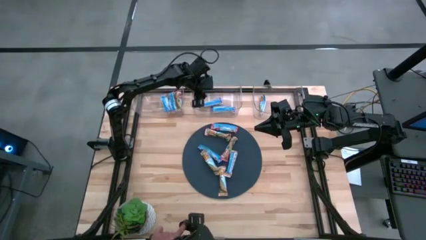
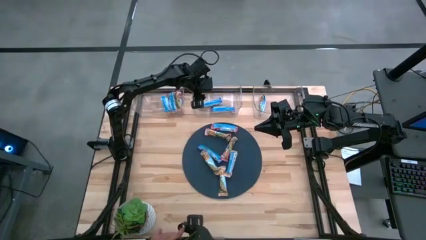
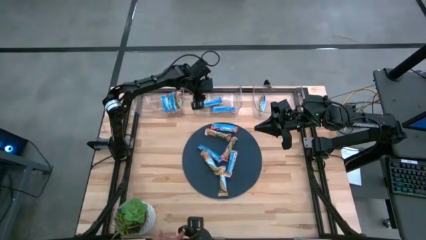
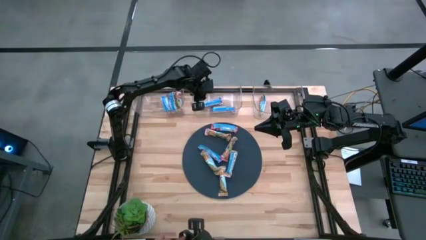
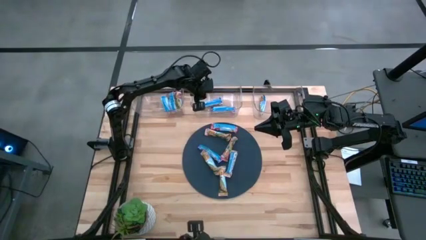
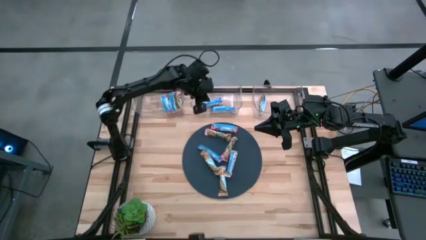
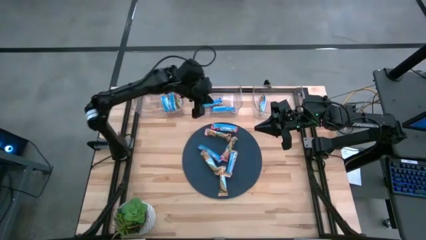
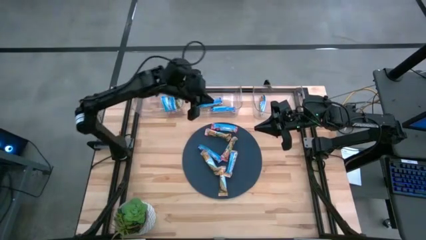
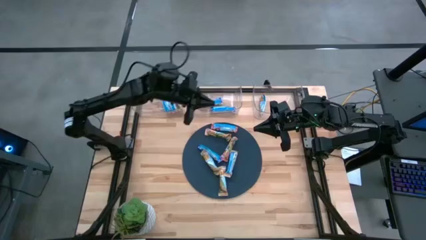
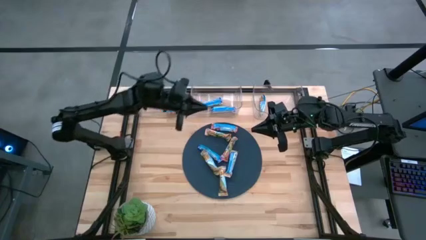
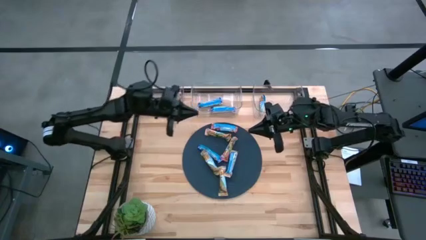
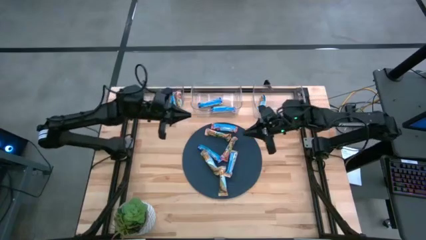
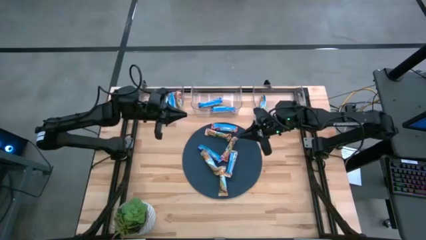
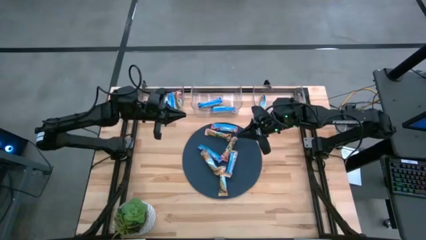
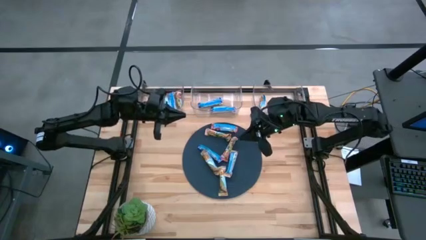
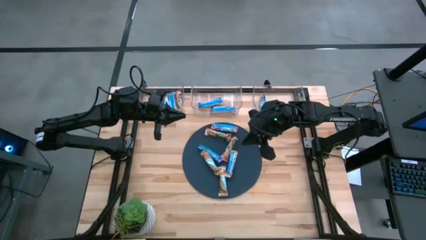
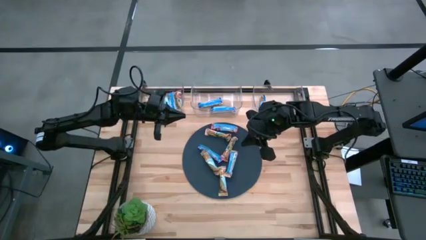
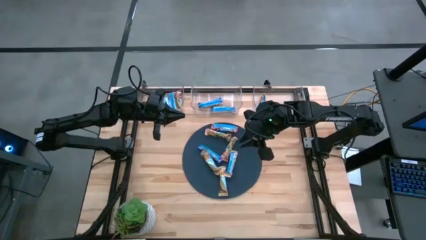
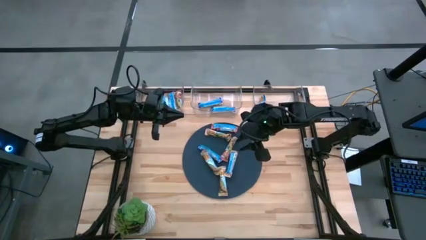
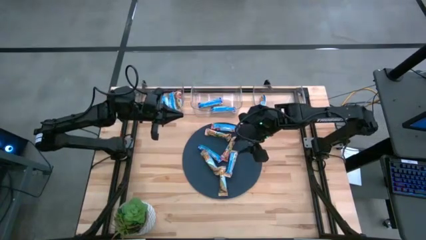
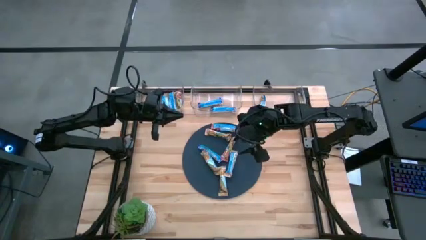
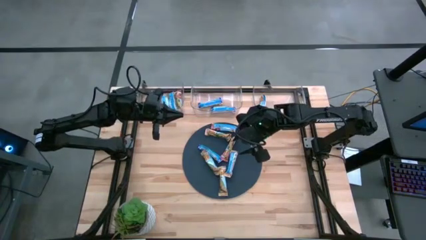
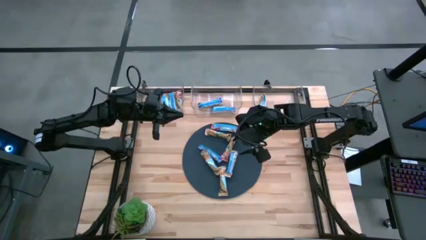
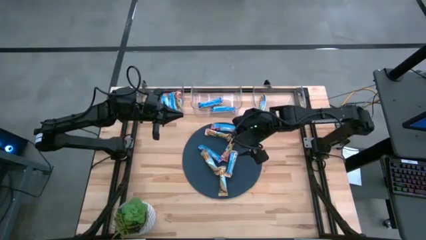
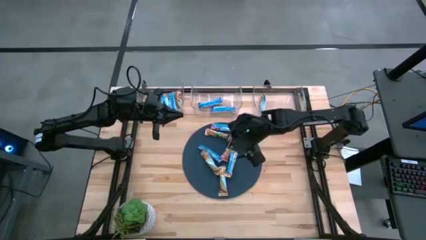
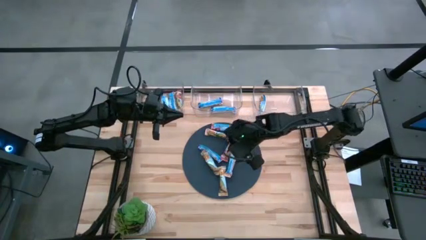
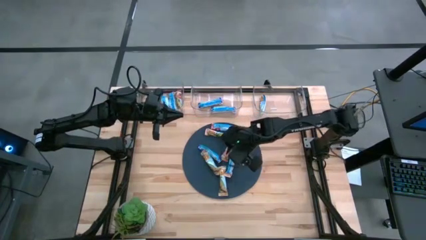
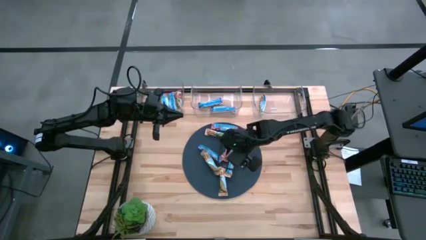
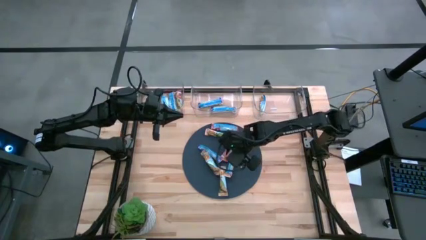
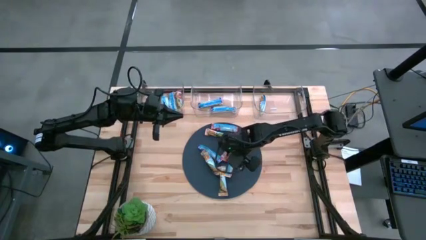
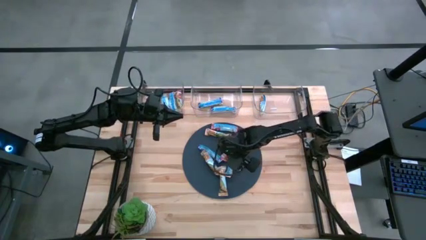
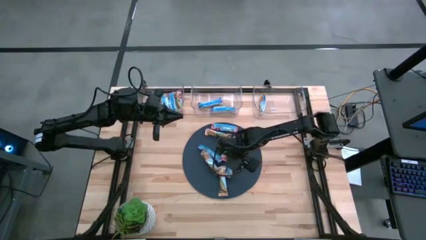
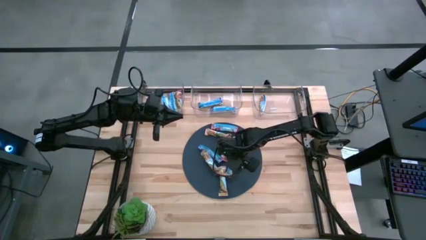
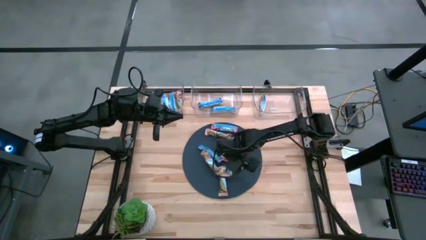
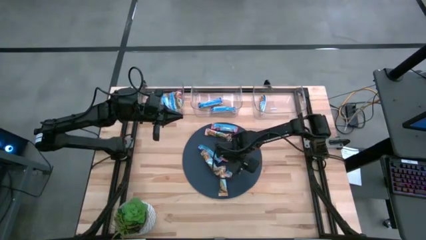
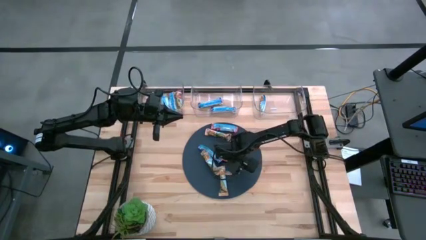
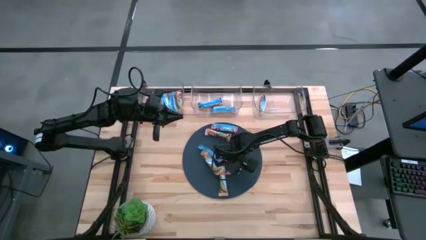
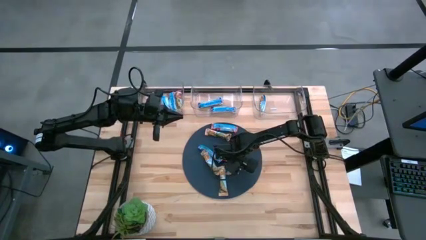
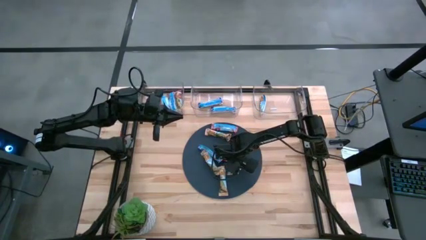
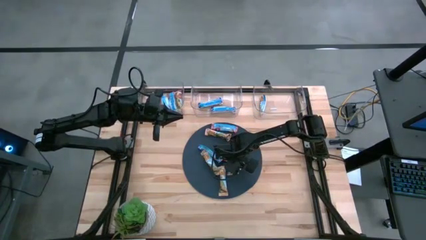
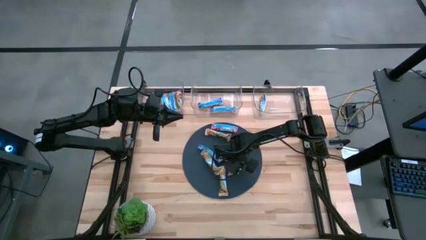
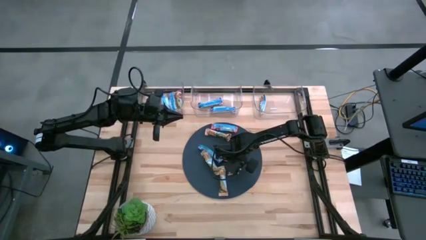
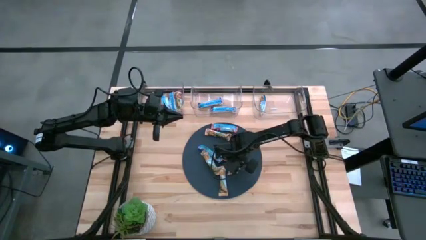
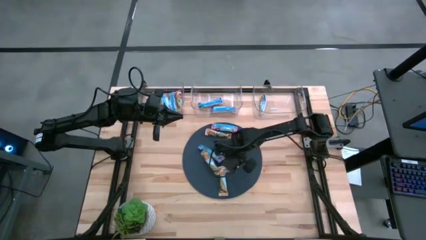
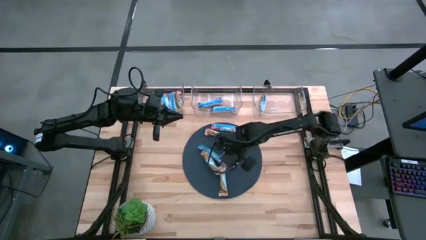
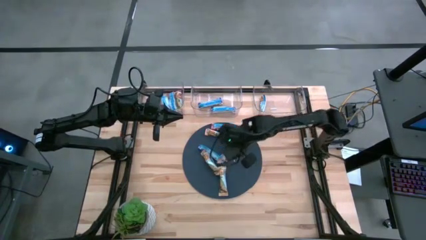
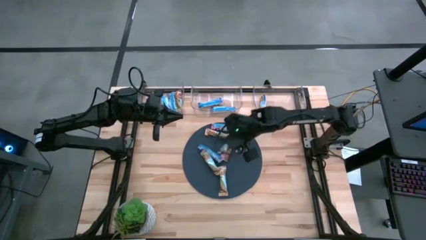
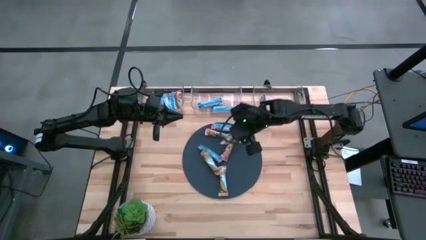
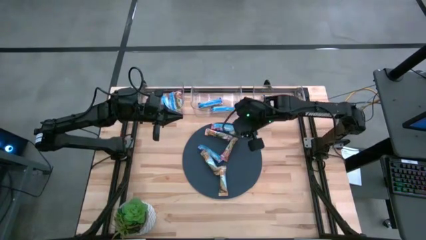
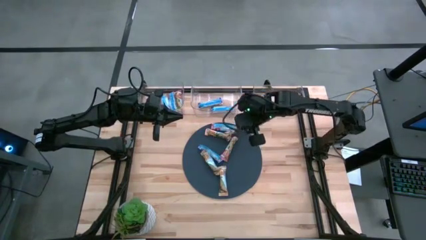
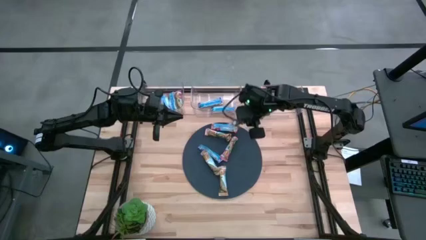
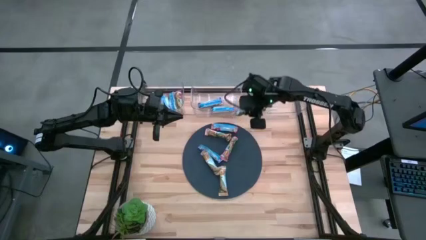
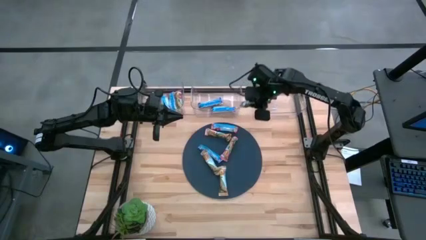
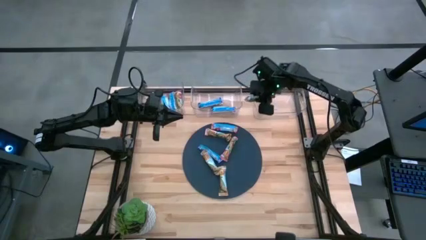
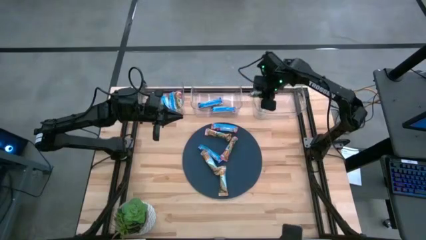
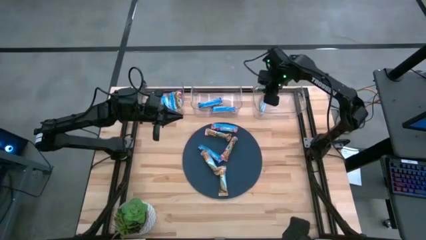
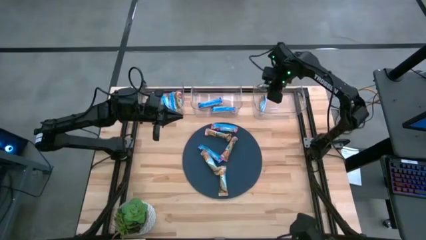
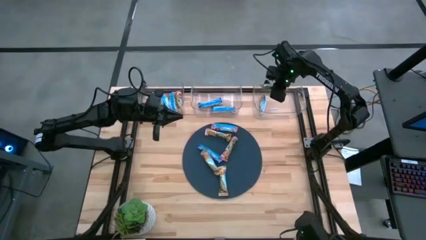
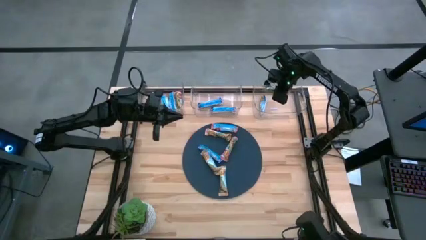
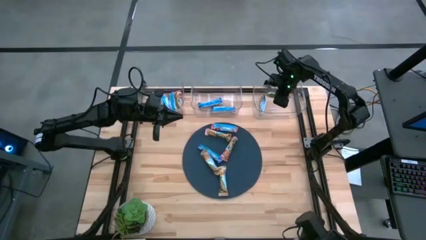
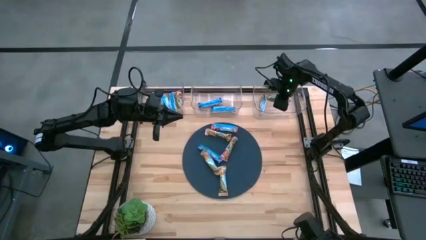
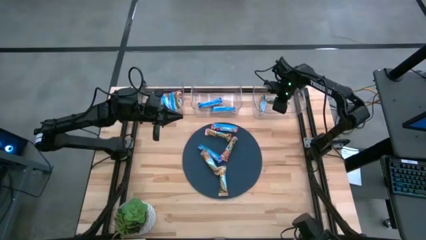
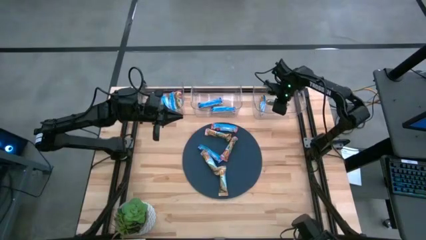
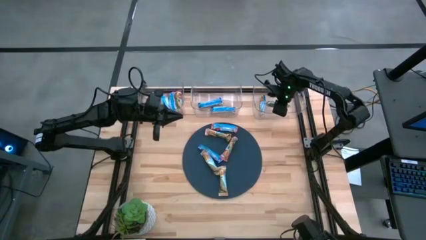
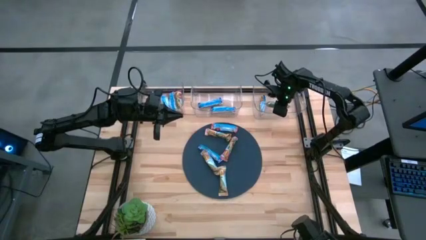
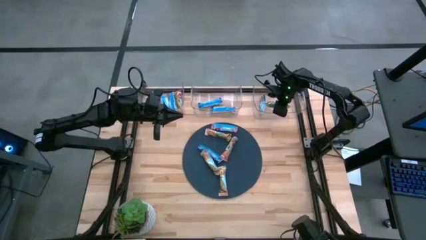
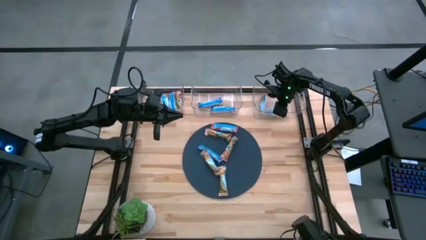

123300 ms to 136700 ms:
Task: Pick and place Granola Bars by type
Put the yellow granola bar into the right transparent bin

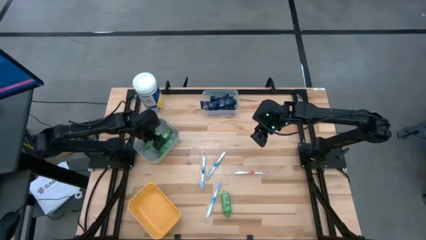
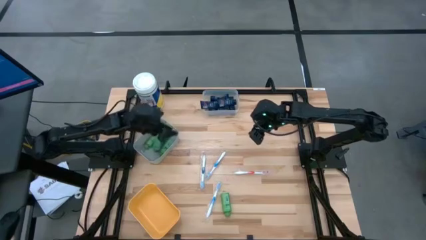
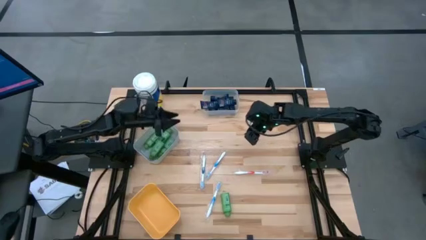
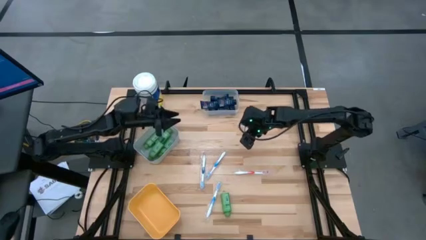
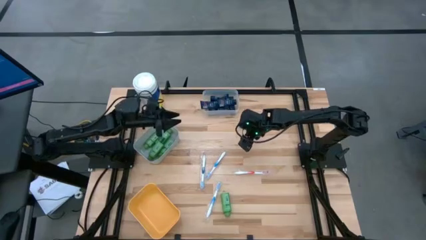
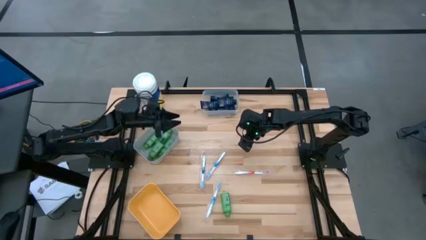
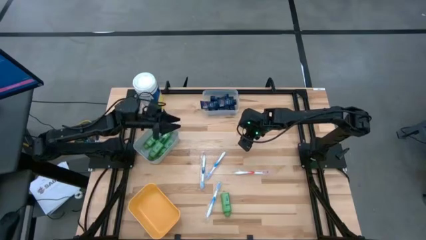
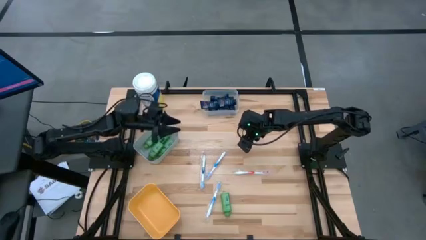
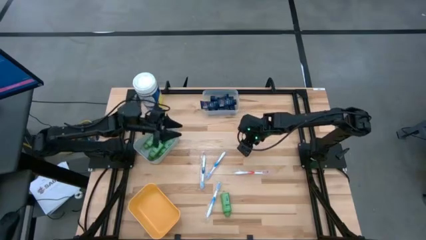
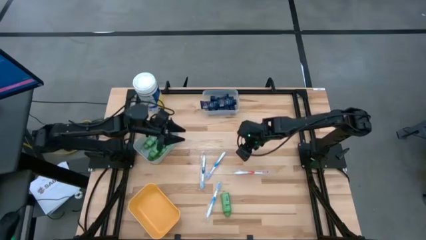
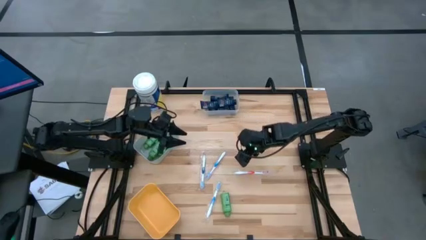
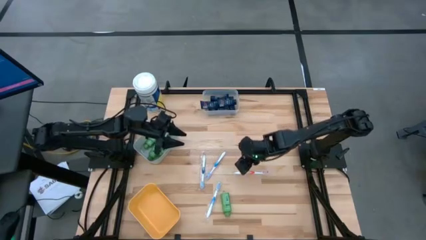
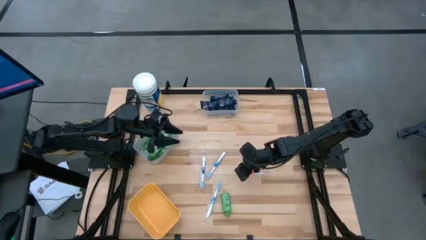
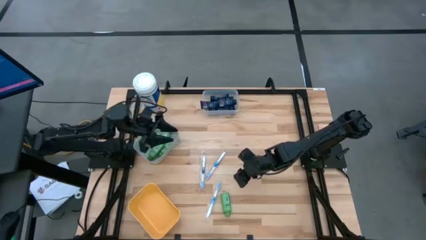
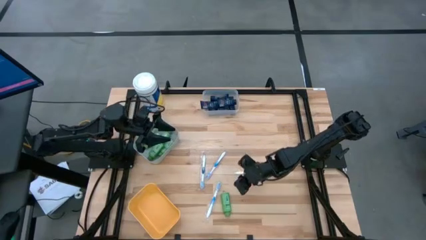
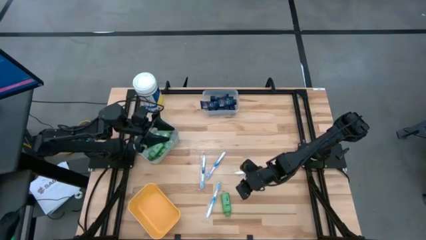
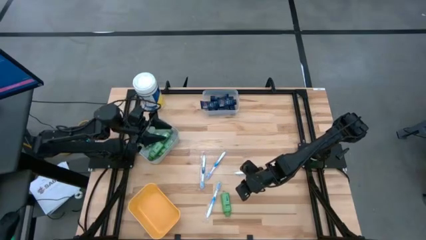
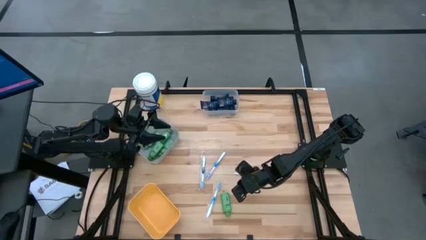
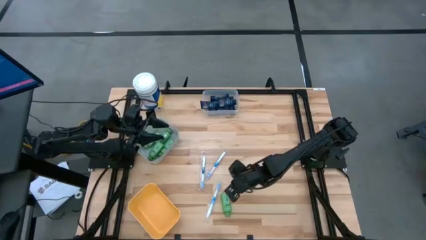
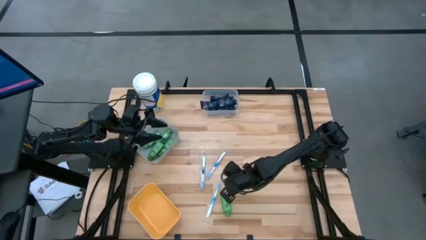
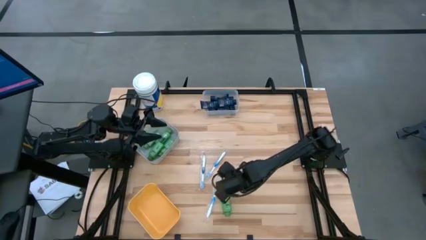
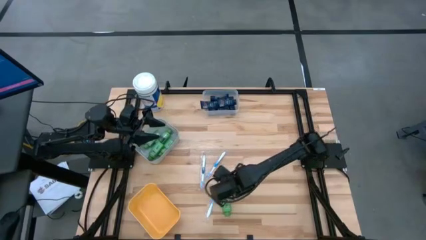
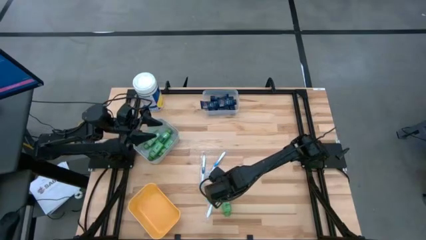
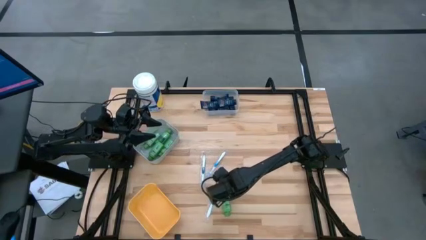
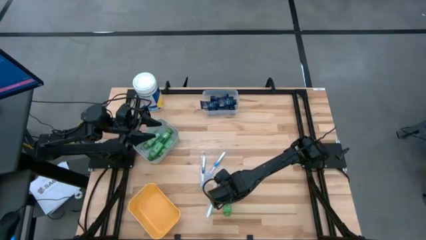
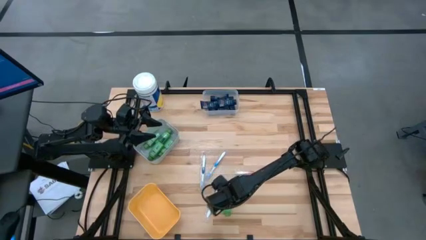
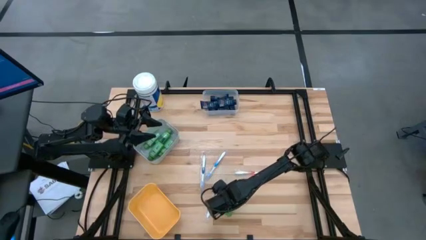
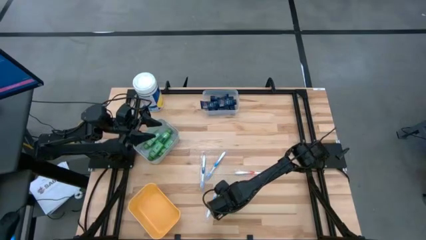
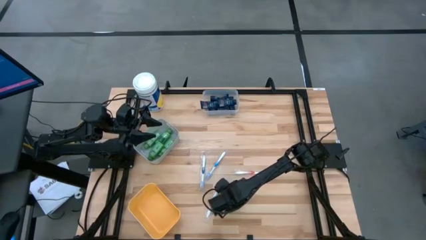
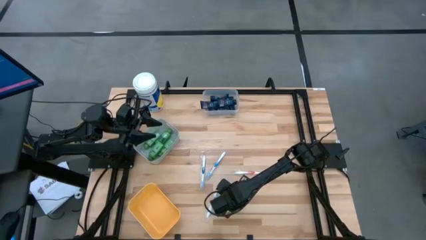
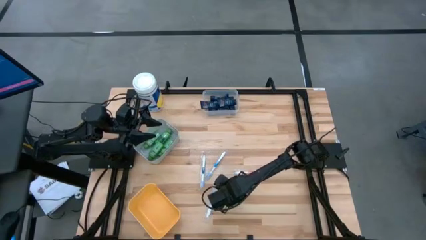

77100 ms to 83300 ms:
Task: Pick & Place Travel size toiletries
Put the green shampoo into the gray bin
